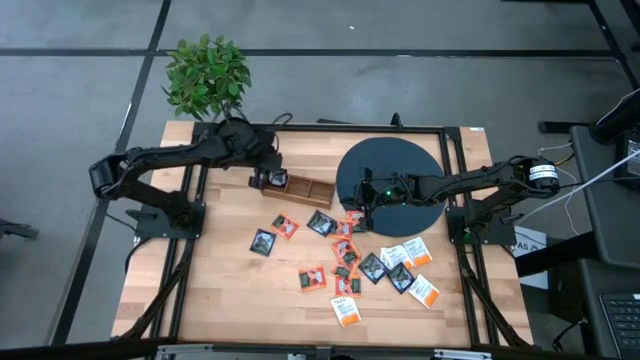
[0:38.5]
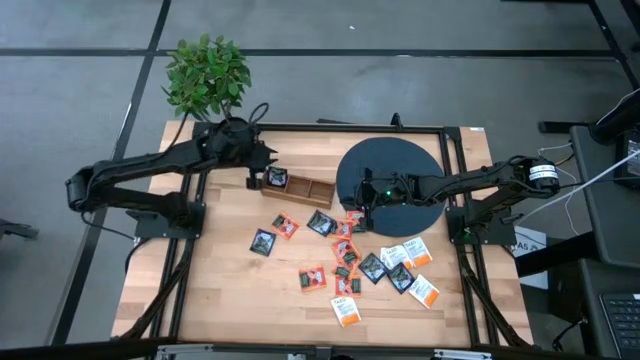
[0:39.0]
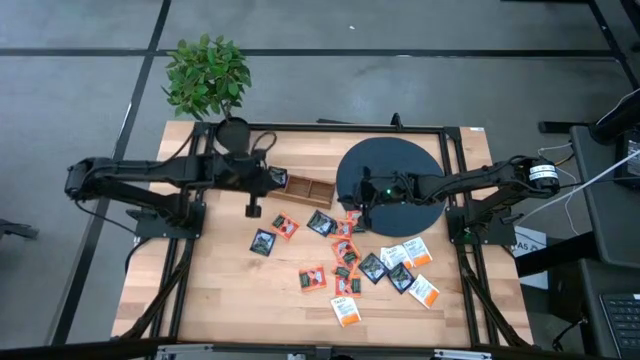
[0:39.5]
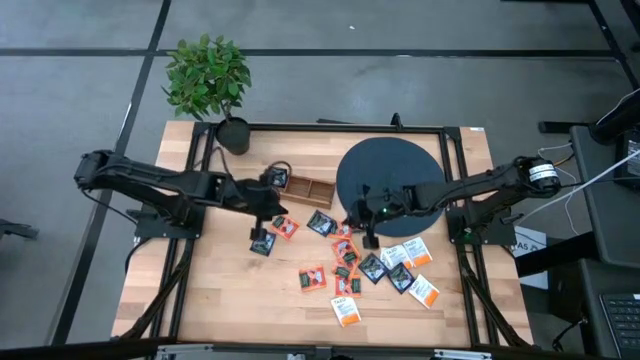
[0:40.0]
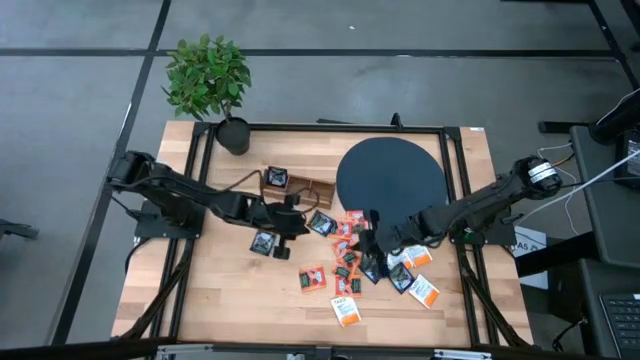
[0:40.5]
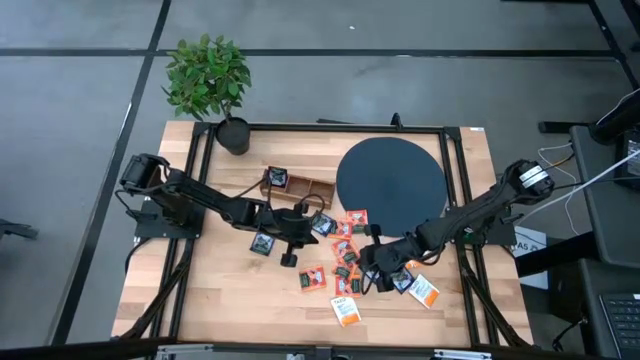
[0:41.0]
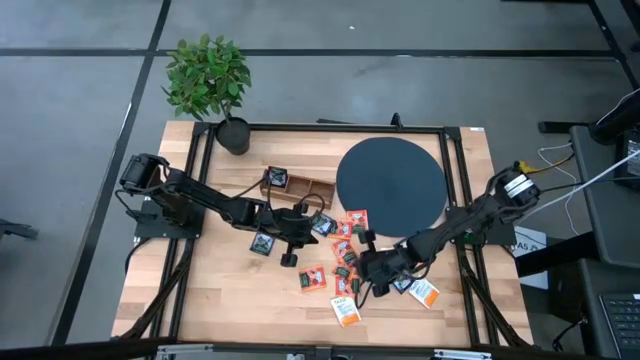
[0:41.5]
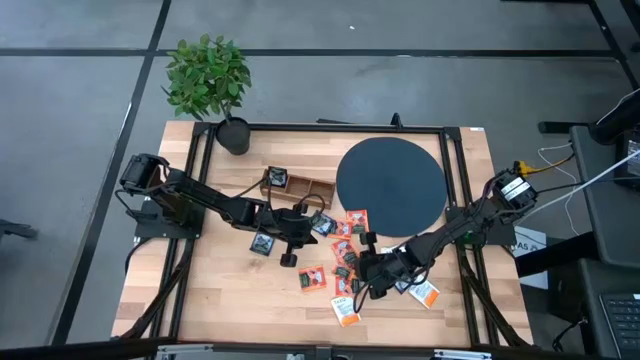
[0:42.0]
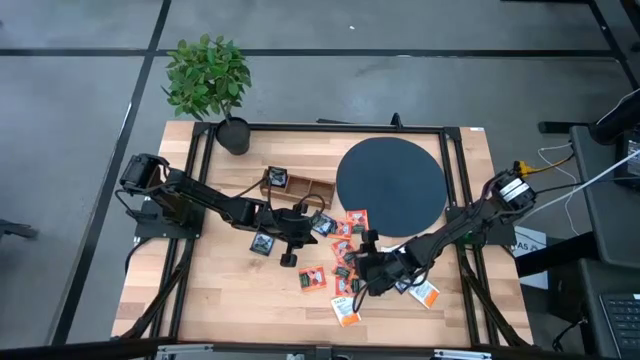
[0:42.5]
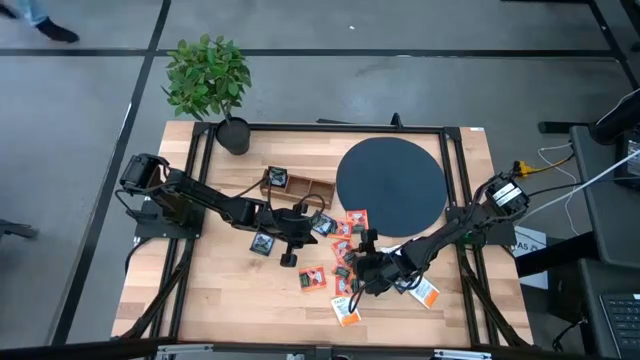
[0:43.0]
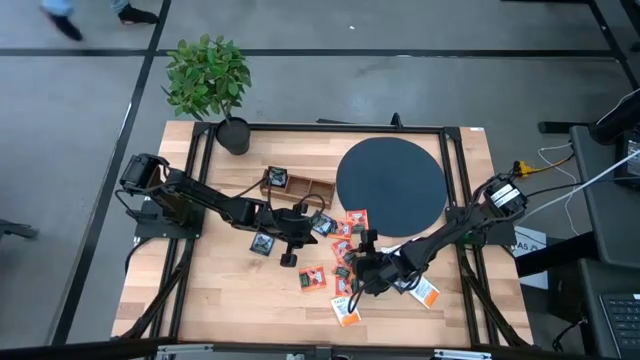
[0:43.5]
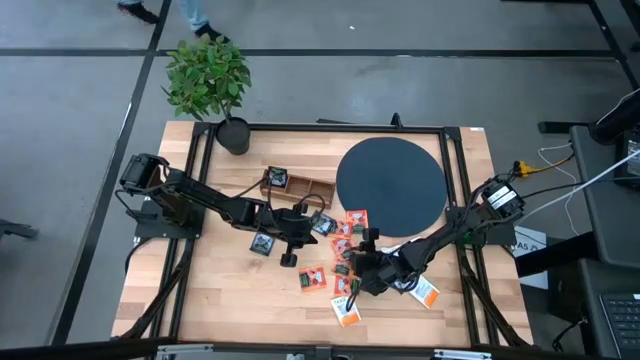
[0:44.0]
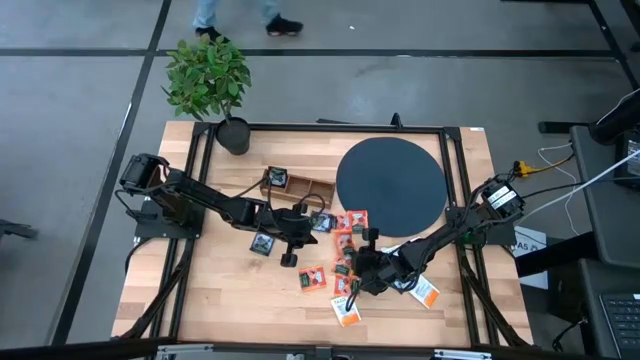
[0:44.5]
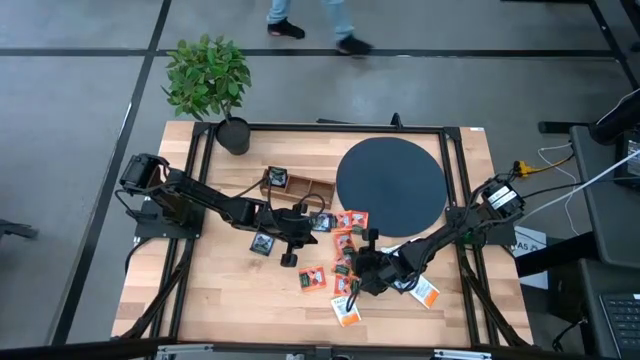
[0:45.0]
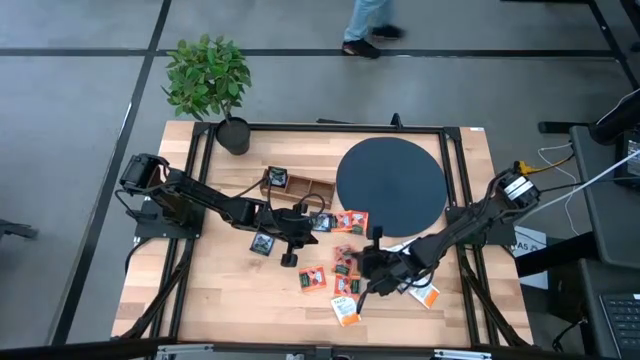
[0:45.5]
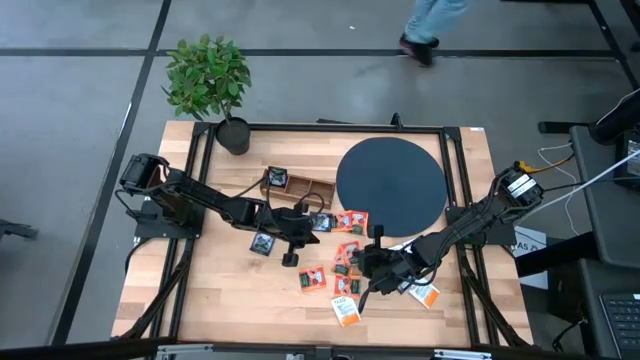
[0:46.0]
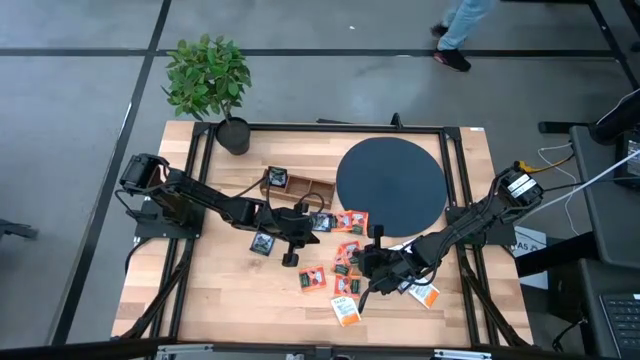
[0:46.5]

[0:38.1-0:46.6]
Task: Pick & Place Tea
Put the orange tea bag into the middle section of the wooden organizer

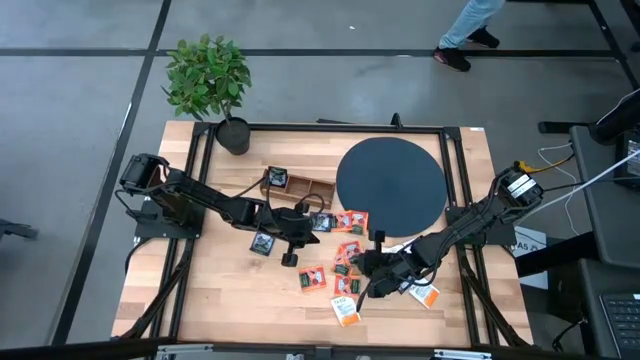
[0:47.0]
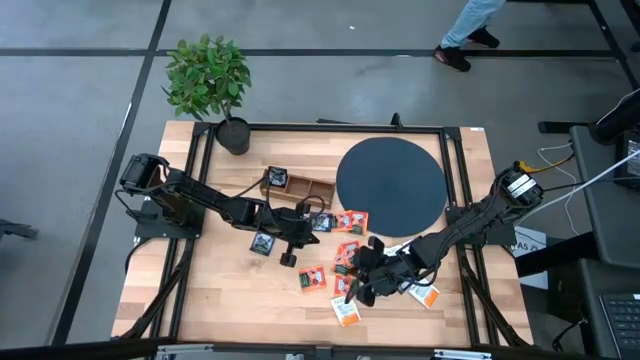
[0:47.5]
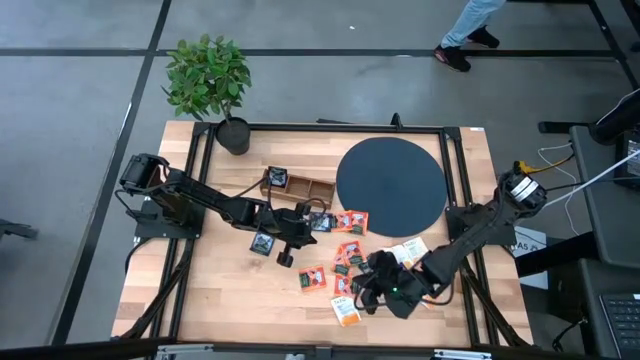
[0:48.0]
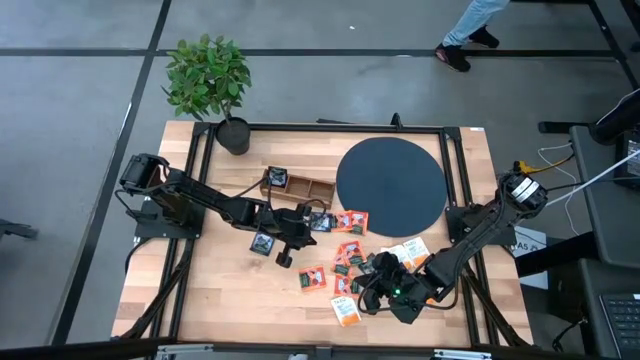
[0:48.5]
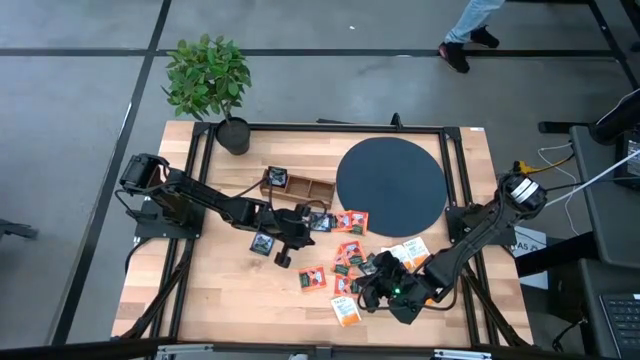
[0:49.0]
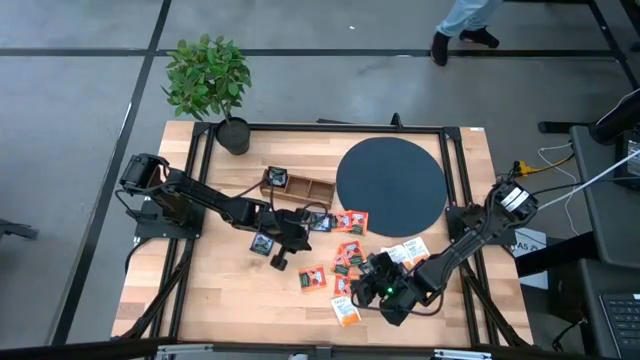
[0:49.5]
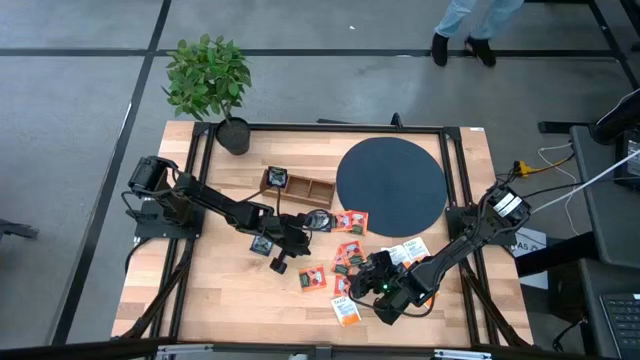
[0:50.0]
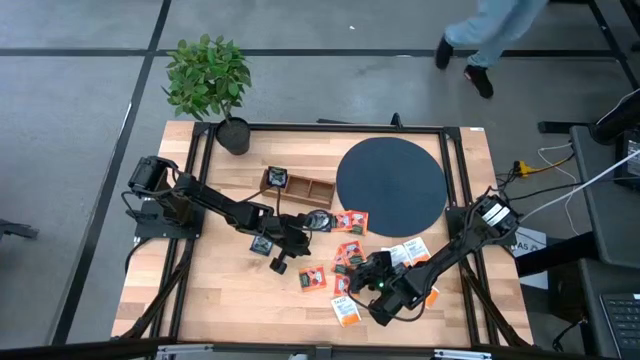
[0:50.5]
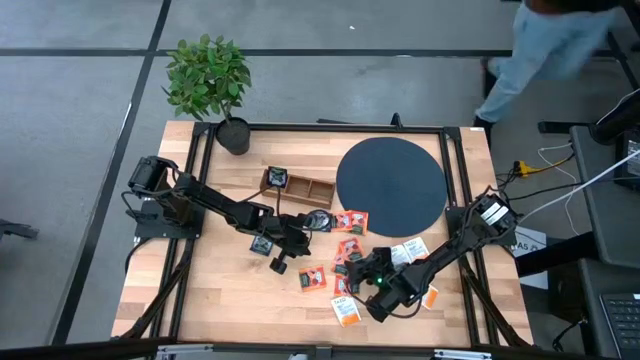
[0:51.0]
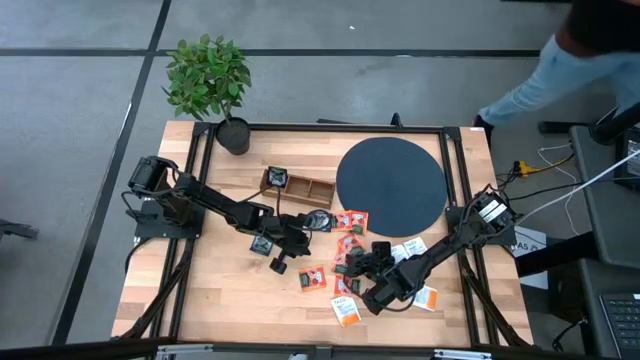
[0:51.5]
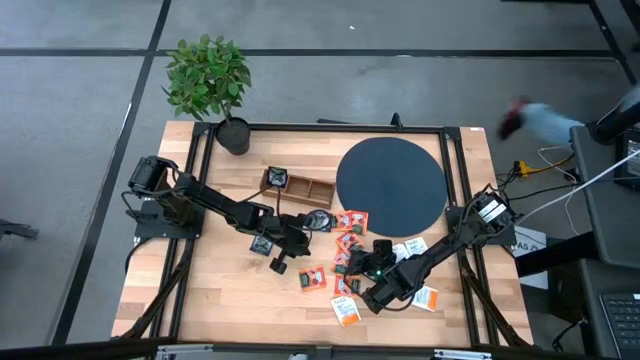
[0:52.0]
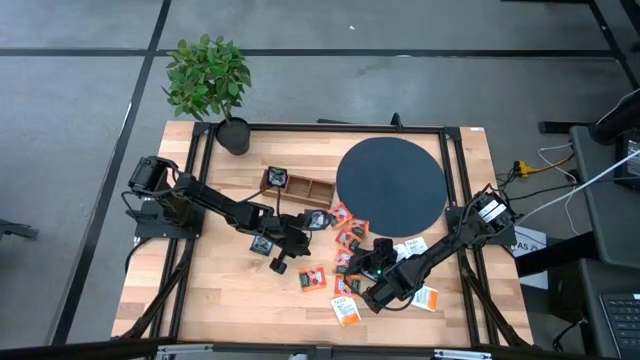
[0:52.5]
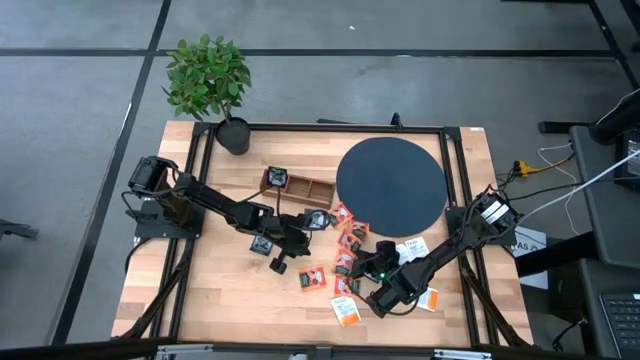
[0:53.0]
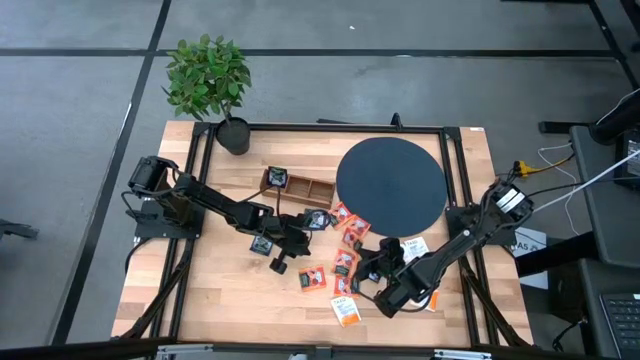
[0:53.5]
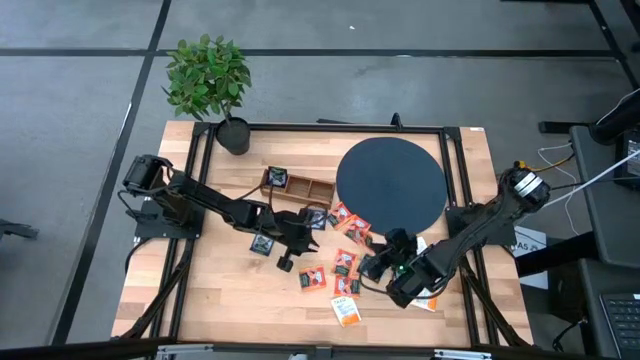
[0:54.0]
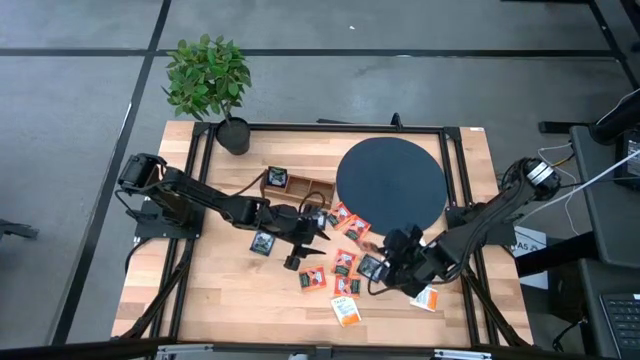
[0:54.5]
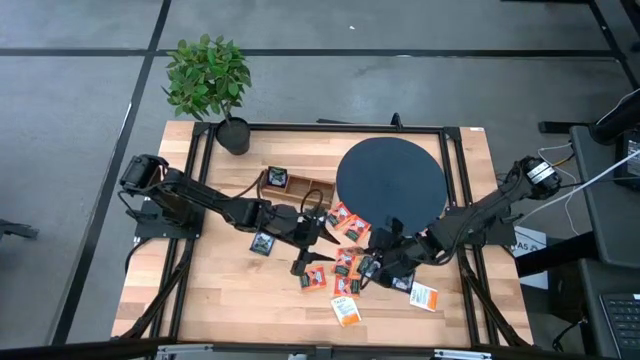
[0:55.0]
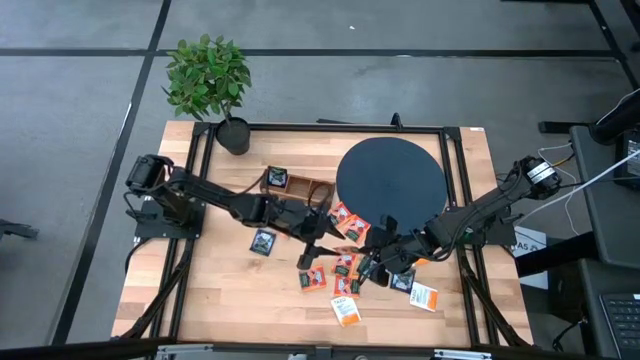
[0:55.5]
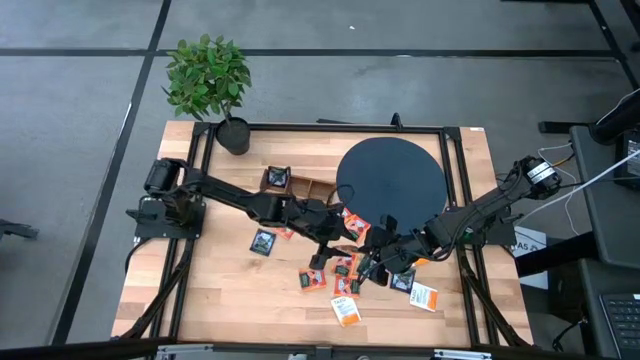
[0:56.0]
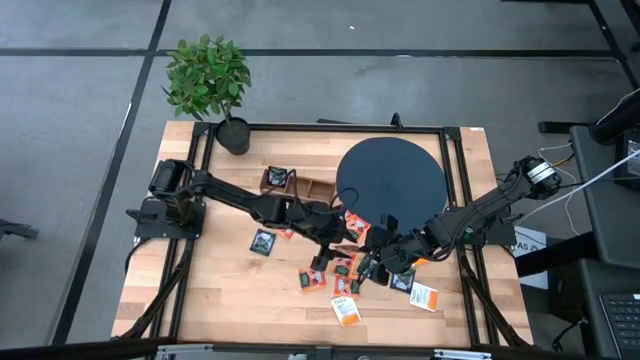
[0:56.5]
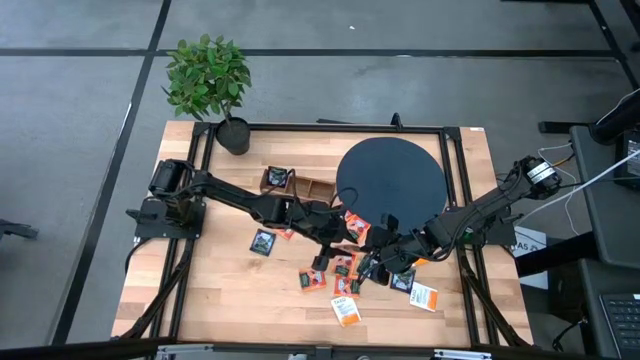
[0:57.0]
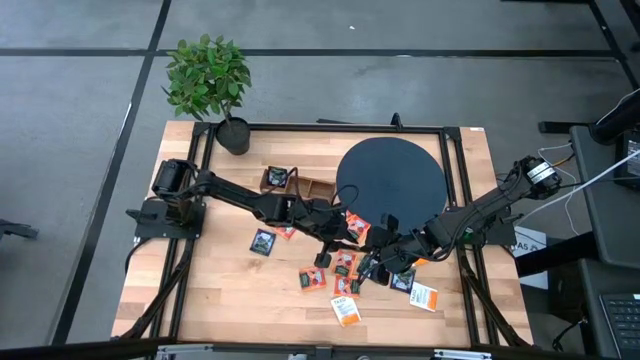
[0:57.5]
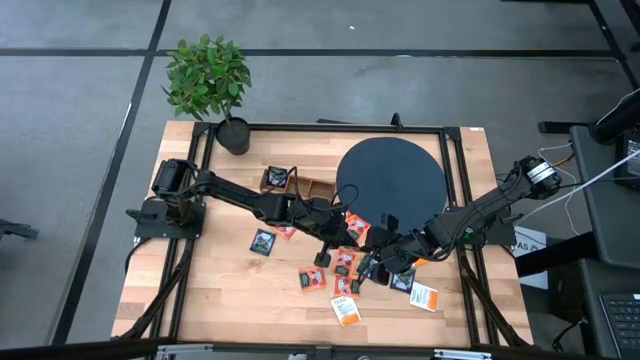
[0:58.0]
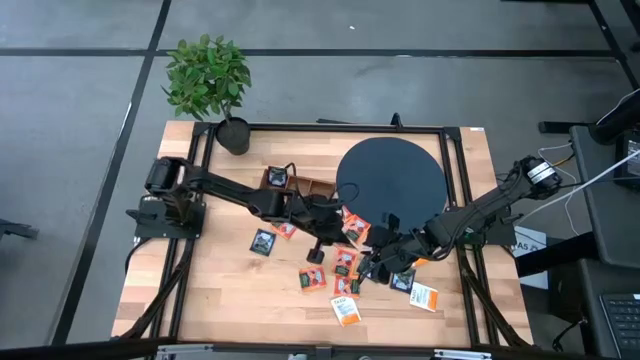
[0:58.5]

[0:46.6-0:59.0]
Put the orange tea bag into the middle section of the wooden organizer

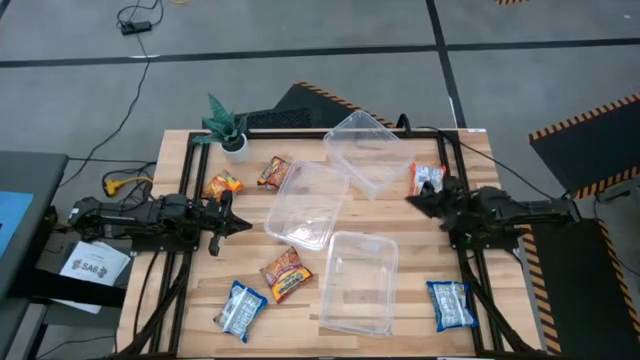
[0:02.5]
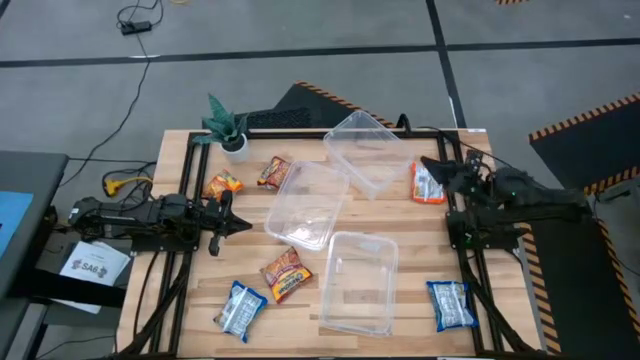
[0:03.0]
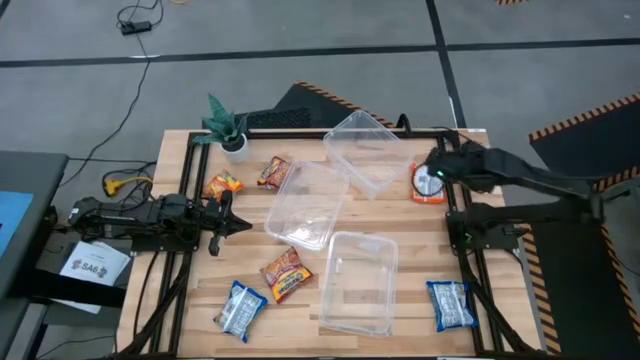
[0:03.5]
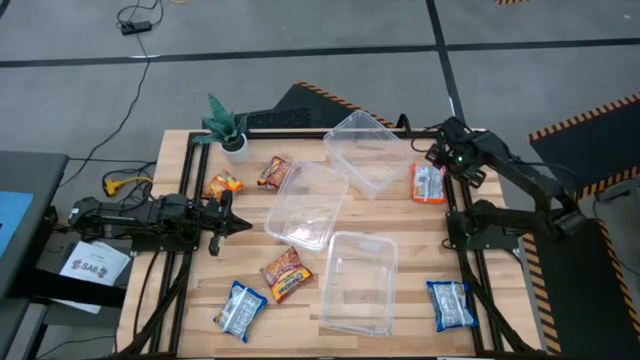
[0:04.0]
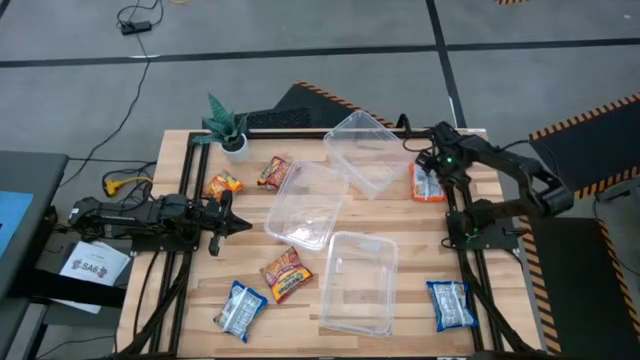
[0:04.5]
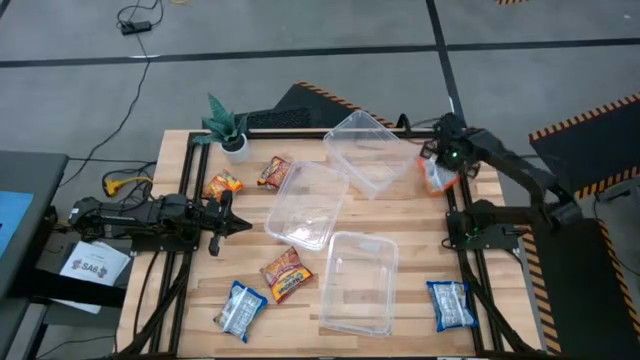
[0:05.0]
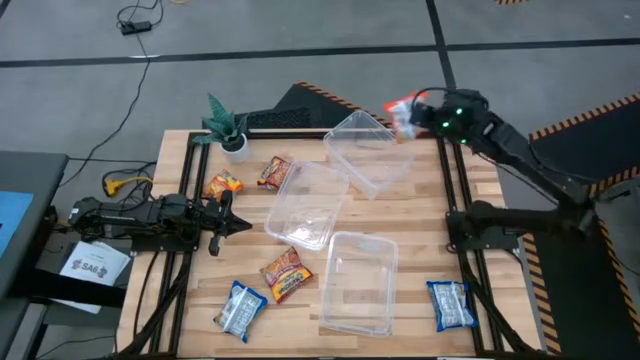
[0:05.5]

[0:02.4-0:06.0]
Task: Sort Maruchan noodles
Put the right orange noodle pack into the top transparent bin
